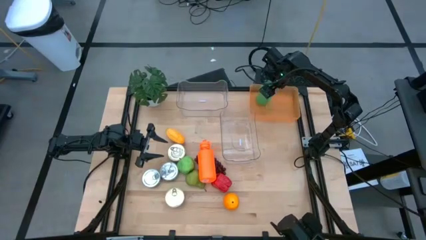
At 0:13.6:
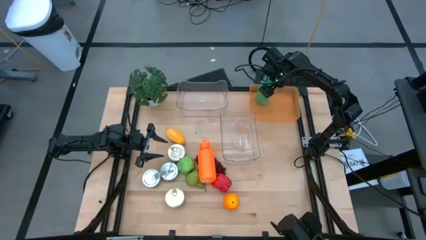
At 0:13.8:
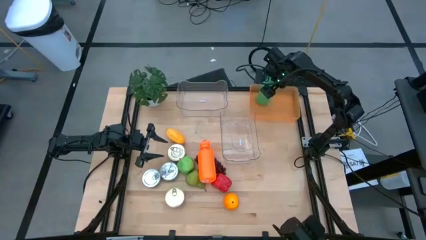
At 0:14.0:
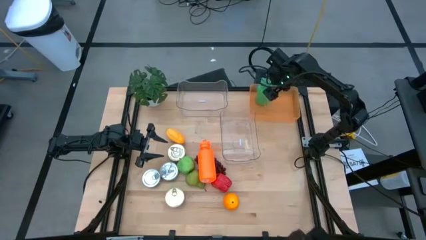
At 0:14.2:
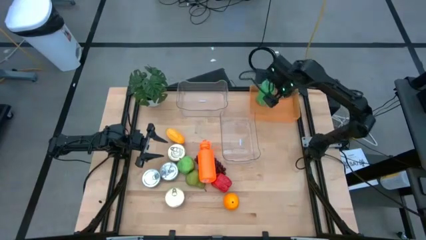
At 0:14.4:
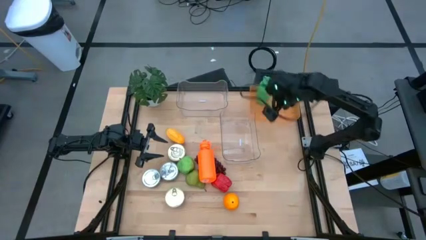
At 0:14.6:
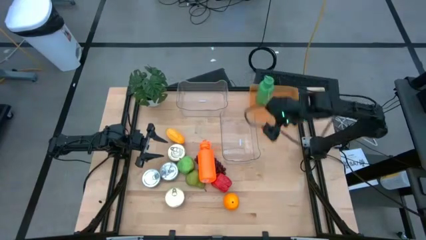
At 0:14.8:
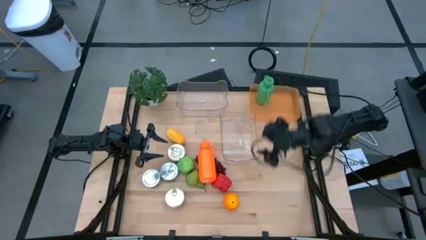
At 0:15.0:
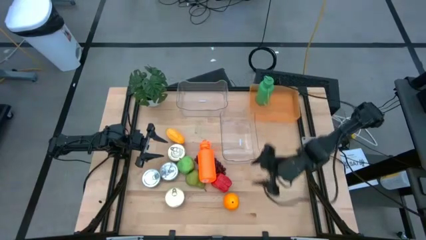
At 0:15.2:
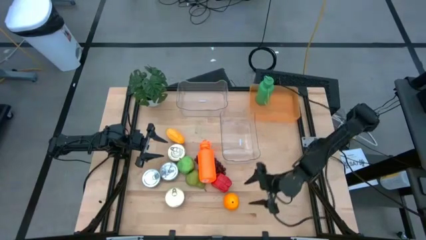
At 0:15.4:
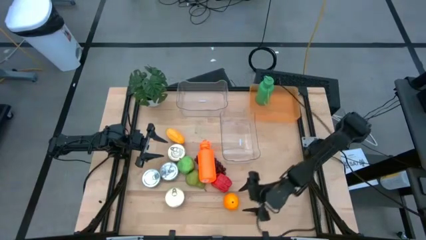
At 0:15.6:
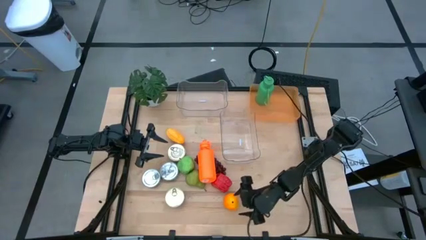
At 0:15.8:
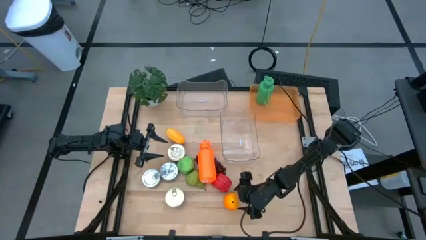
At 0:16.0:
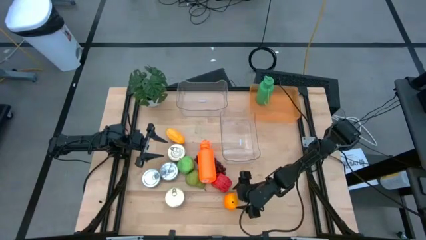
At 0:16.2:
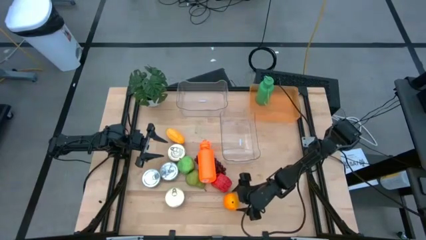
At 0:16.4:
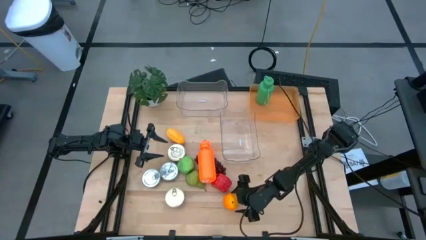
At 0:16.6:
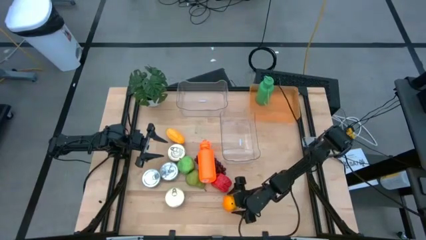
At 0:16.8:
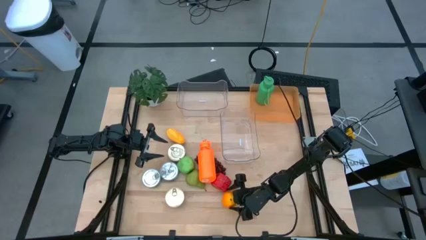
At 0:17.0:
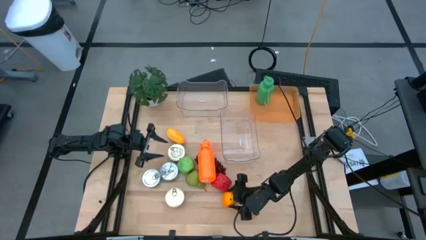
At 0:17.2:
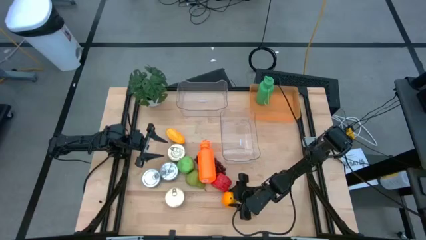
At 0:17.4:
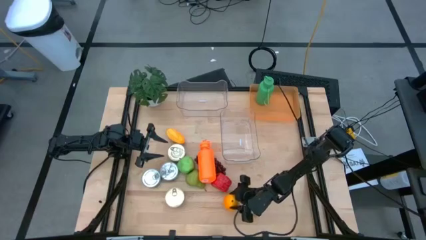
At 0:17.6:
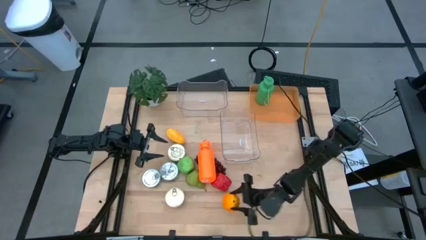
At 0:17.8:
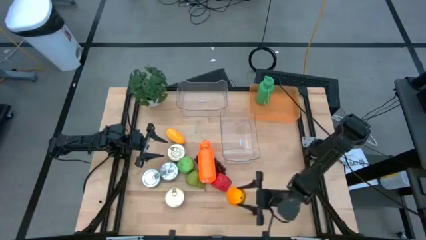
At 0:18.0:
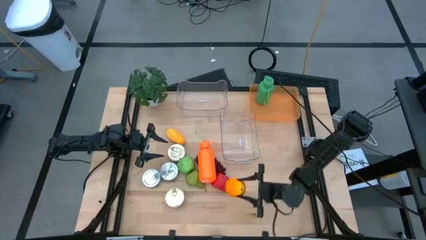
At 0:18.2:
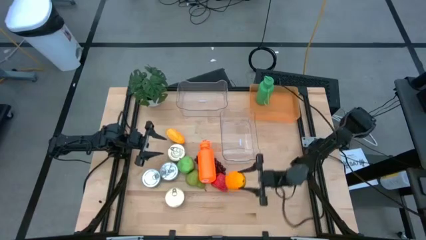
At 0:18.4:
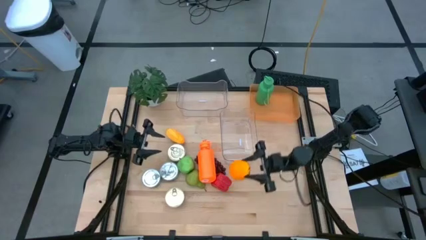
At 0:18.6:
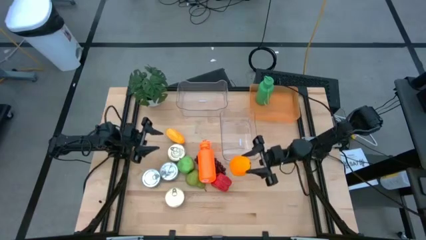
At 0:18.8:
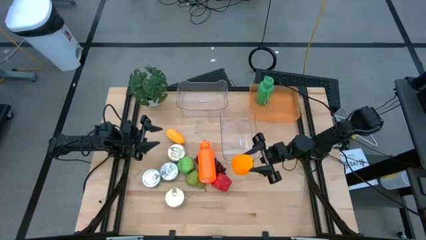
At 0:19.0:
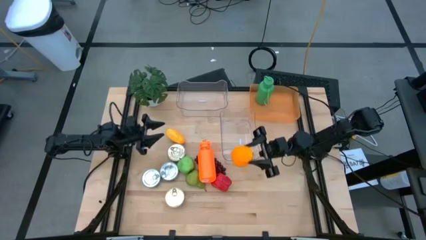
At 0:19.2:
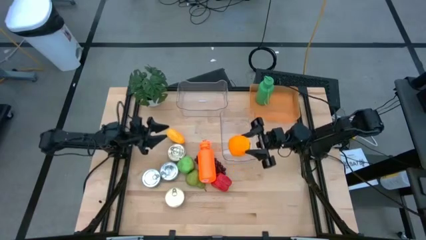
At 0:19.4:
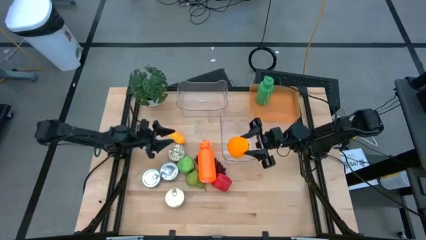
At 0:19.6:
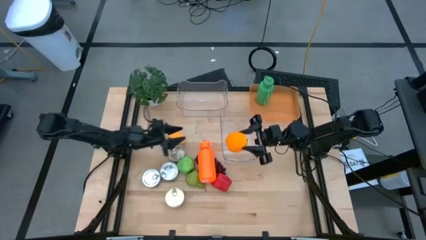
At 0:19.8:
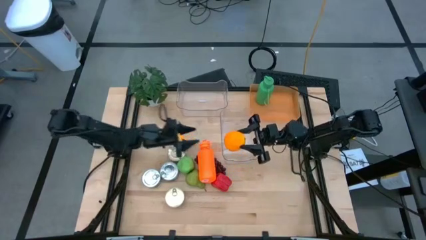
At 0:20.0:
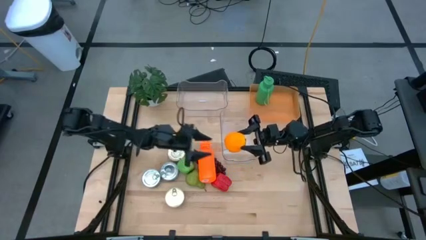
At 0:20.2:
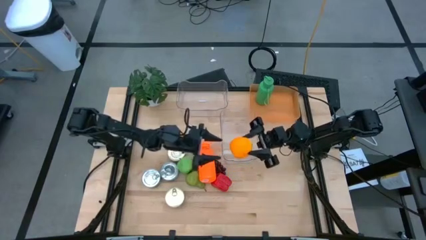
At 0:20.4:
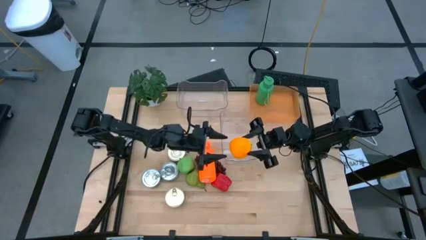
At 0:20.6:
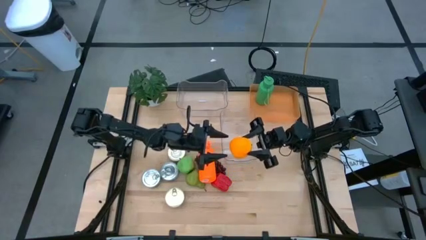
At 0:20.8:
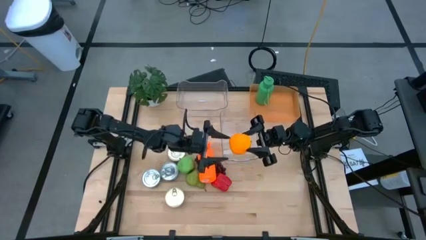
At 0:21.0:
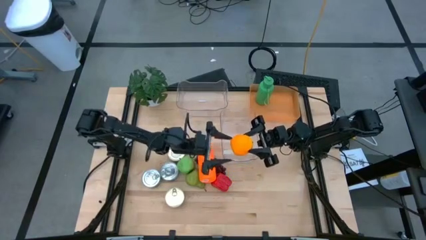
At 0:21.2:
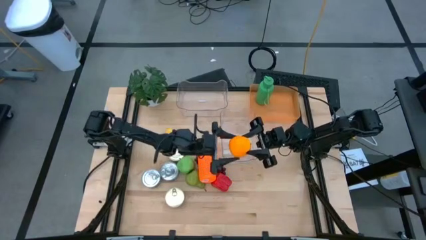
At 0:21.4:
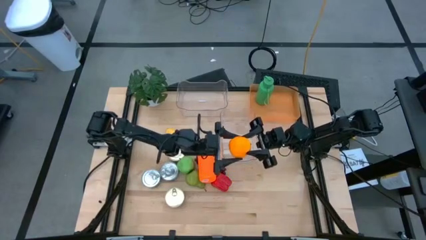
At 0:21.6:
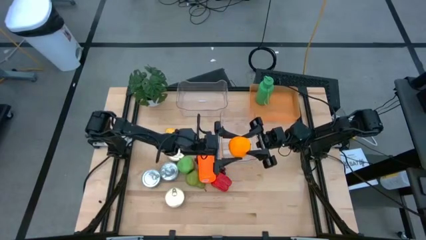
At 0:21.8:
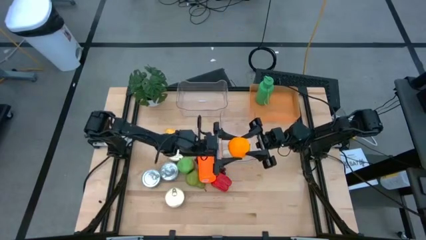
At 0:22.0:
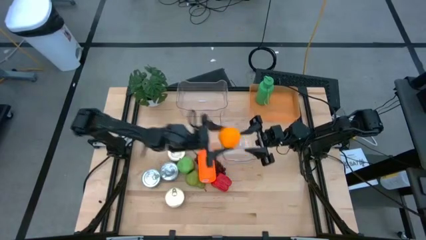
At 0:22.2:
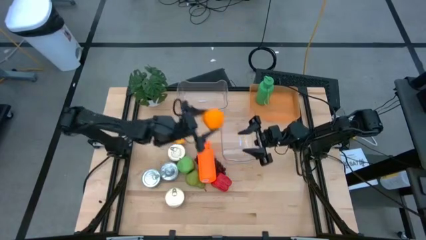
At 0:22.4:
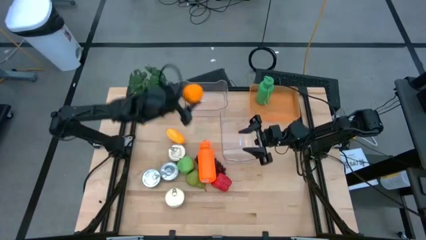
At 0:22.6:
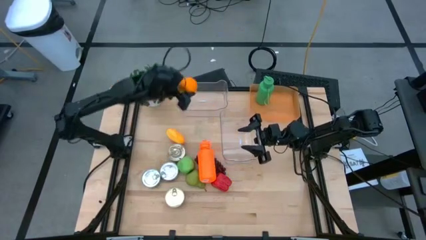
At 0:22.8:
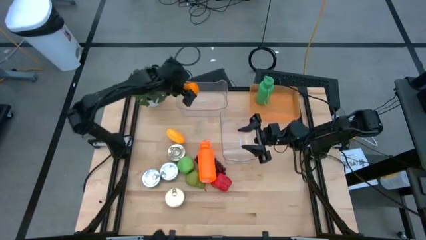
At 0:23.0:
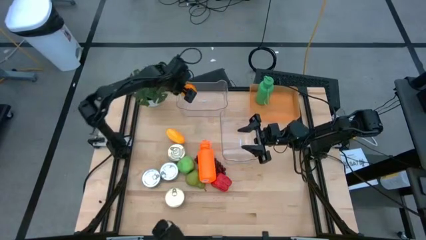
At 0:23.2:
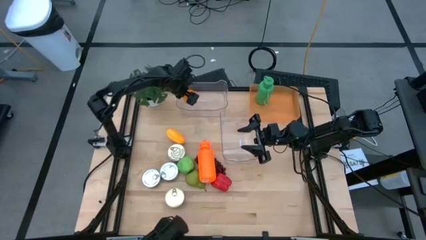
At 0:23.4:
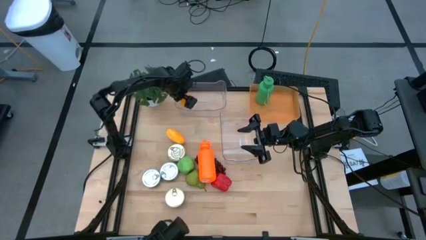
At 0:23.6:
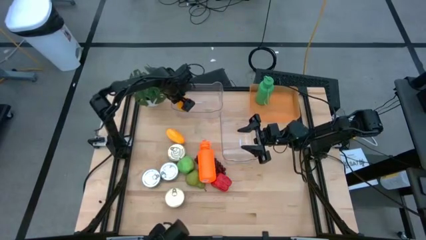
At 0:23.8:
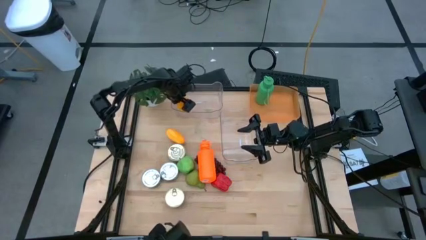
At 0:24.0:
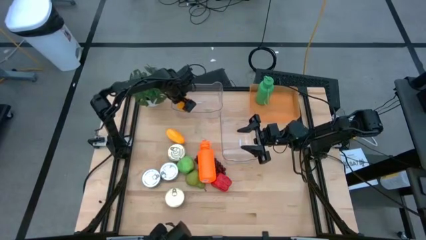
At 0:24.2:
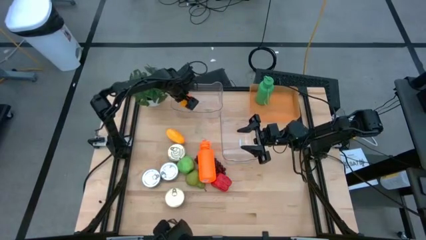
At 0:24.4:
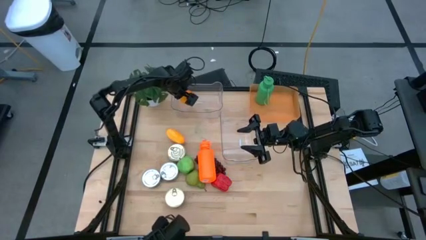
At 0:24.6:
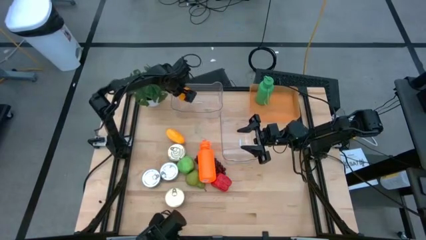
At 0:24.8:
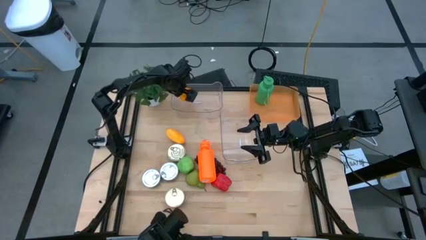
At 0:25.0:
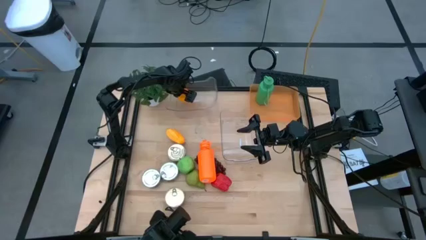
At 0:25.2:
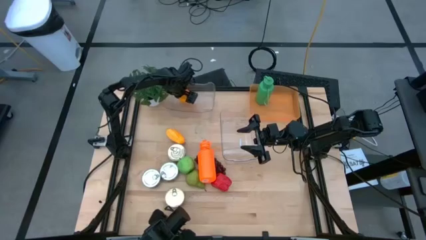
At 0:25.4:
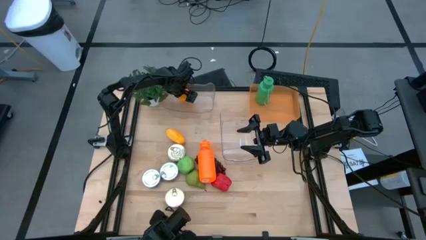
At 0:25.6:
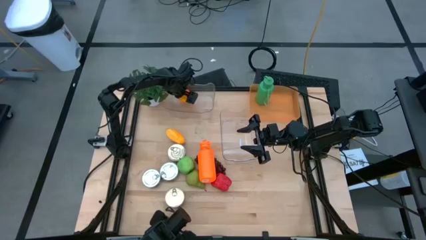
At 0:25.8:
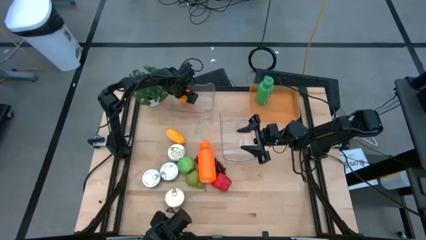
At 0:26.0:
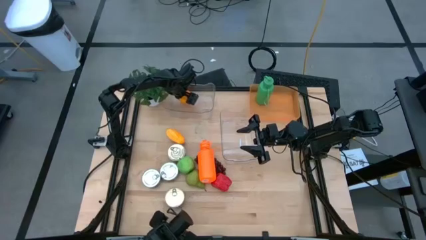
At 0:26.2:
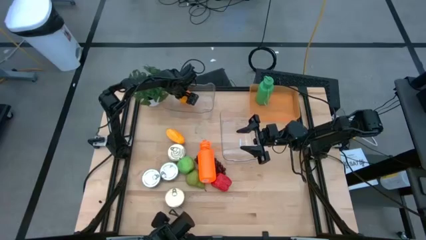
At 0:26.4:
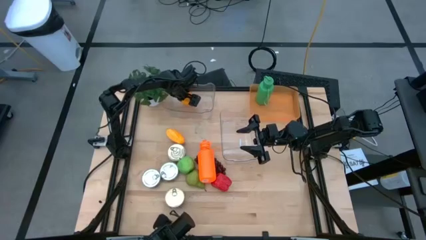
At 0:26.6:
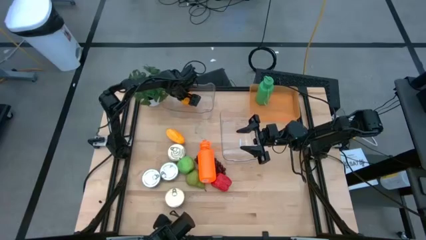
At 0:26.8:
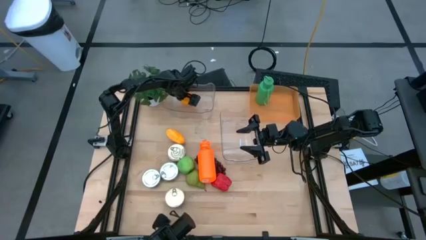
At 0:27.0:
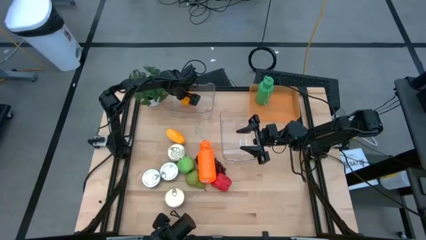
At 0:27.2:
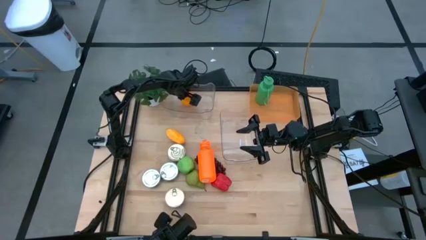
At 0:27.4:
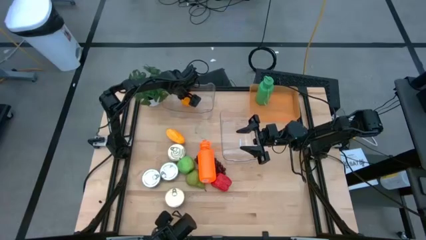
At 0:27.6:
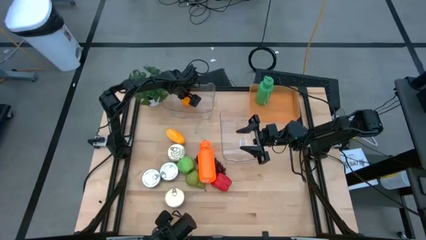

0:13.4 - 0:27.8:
Task: Pick & Place Food Item
Put the orange into the top transparent bin

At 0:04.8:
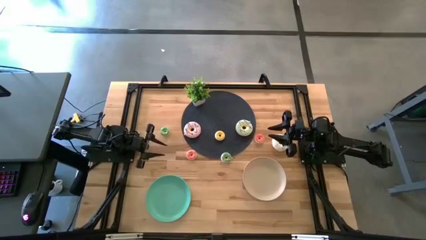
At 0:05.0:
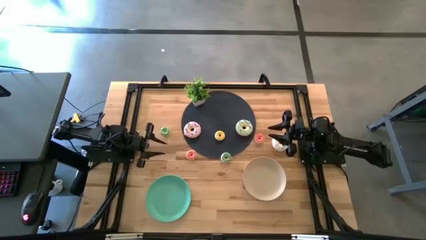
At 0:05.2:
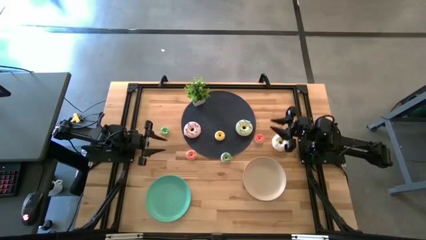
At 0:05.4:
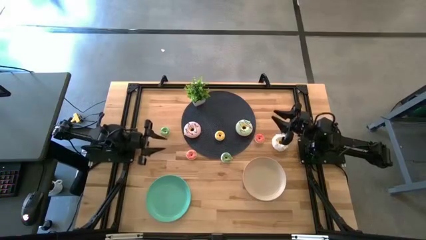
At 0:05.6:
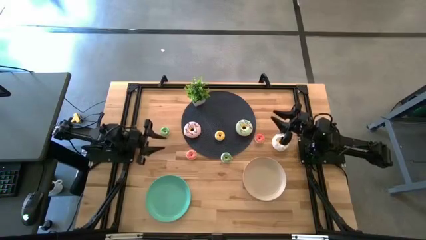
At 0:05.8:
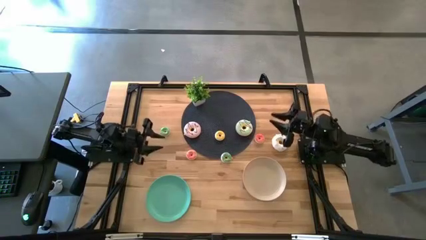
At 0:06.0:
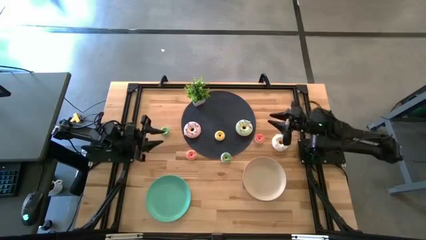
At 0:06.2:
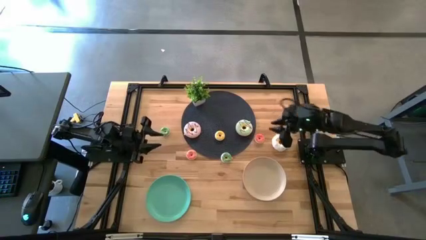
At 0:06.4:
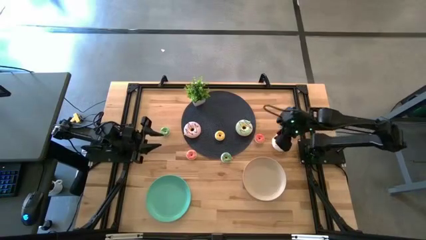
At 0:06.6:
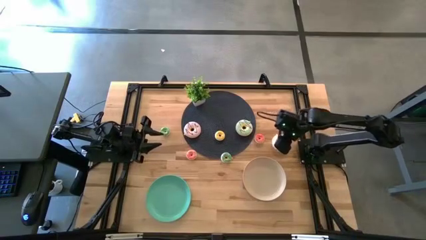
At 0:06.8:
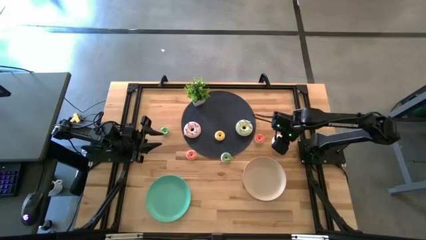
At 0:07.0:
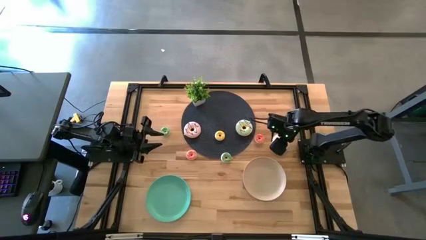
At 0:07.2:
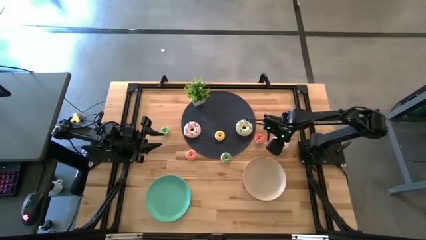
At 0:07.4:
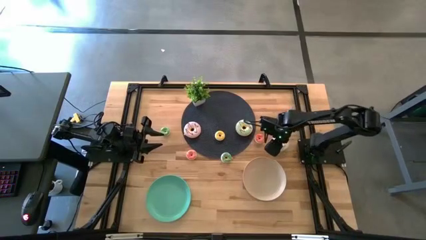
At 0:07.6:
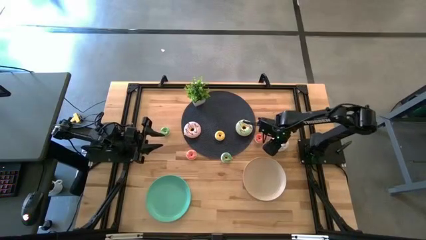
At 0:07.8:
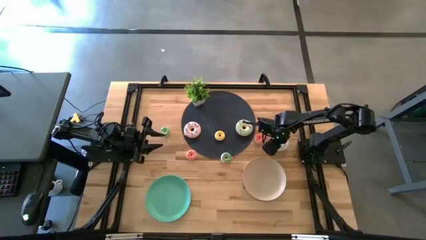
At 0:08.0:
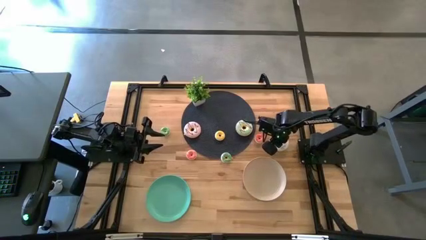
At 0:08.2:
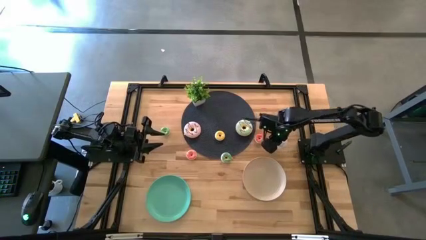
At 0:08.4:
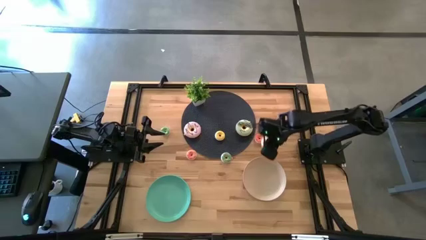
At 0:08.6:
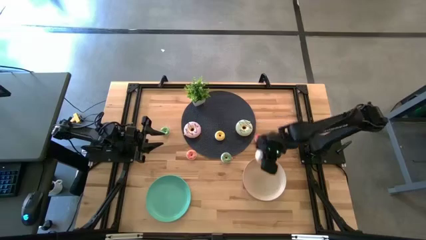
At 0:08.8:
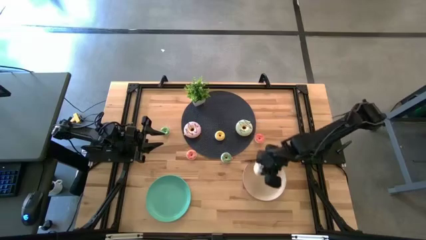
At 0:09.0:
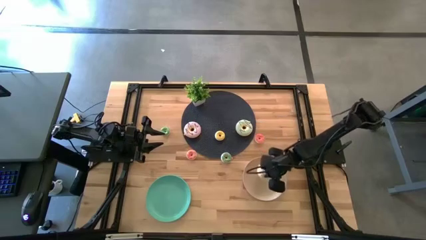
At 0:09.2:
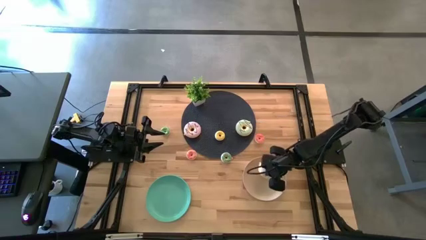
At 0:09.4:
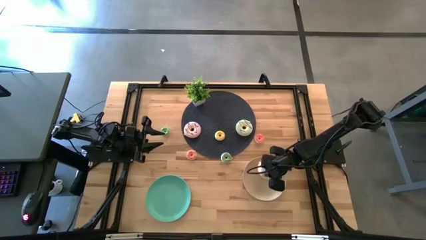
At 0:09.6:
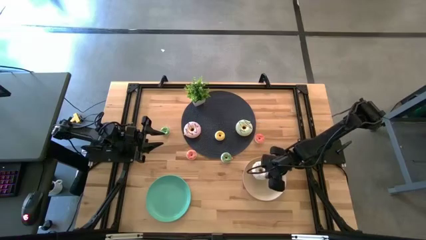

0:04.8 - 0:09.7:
Task: Pick & Place donuts
Put the large white donut on the brown plate
